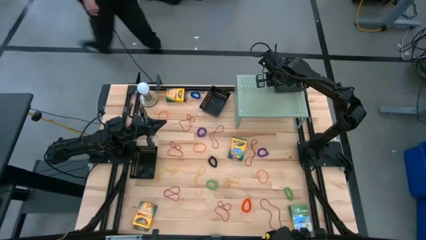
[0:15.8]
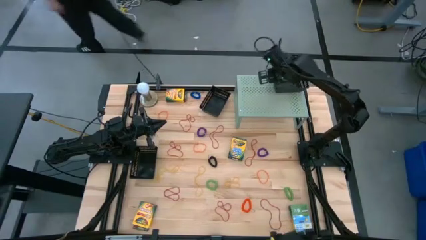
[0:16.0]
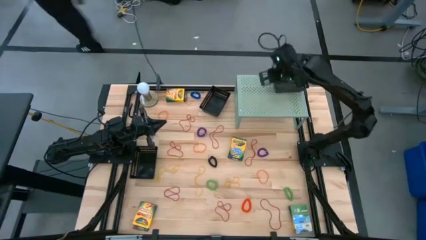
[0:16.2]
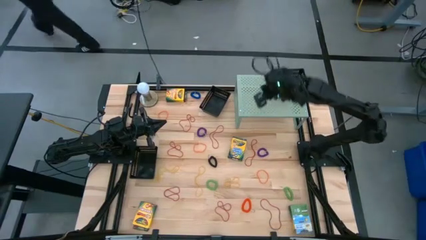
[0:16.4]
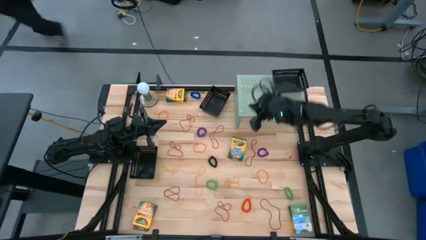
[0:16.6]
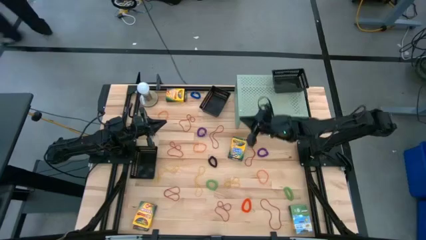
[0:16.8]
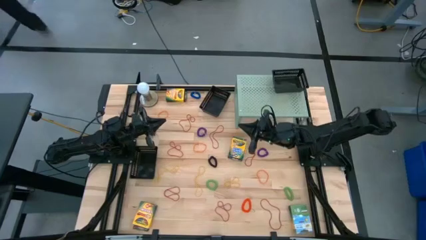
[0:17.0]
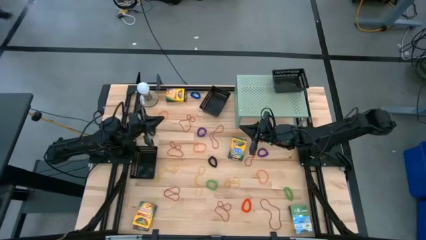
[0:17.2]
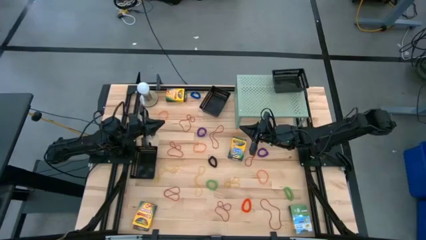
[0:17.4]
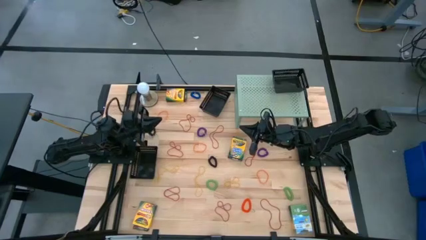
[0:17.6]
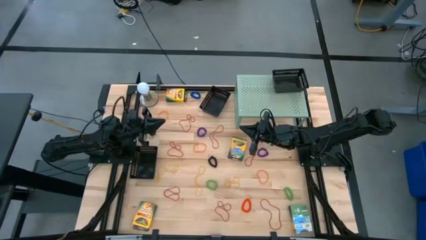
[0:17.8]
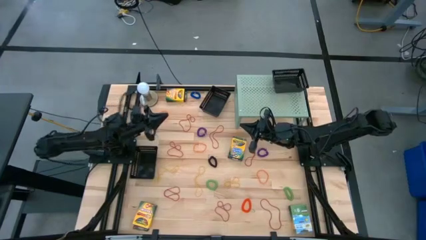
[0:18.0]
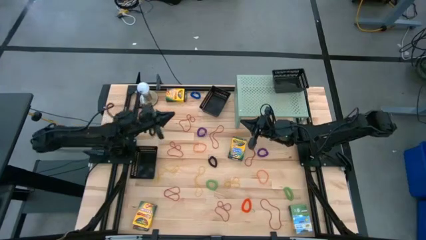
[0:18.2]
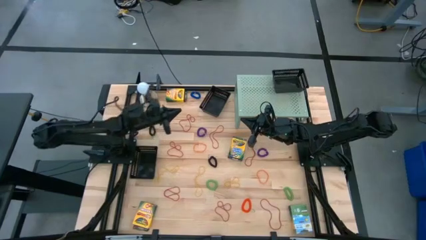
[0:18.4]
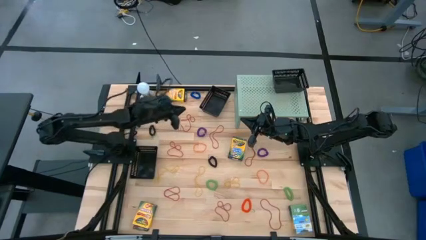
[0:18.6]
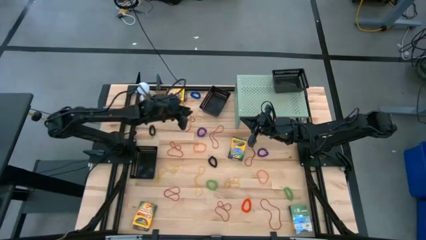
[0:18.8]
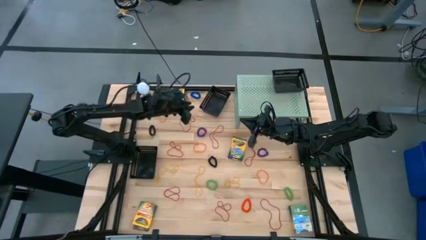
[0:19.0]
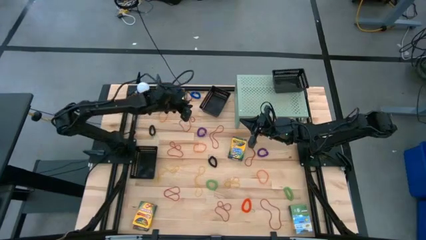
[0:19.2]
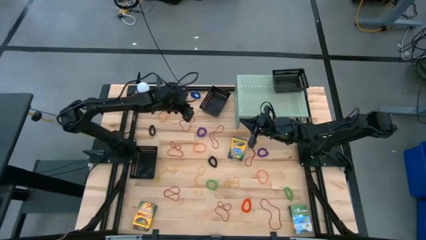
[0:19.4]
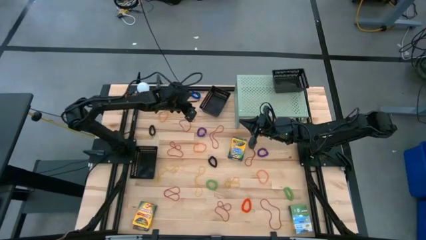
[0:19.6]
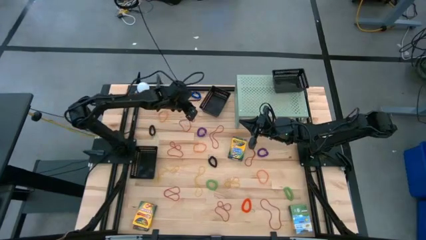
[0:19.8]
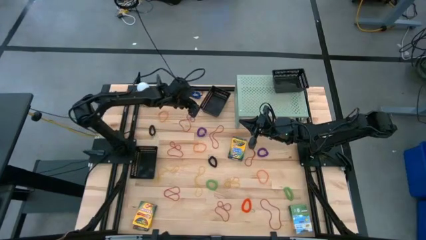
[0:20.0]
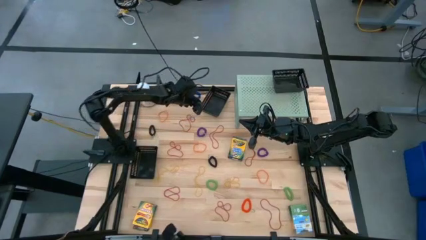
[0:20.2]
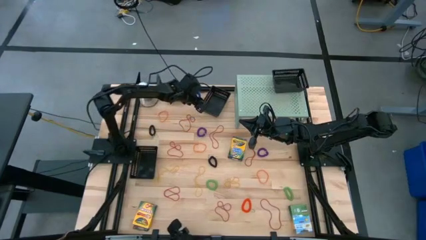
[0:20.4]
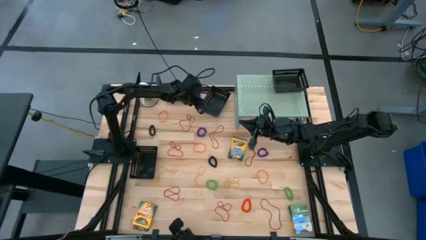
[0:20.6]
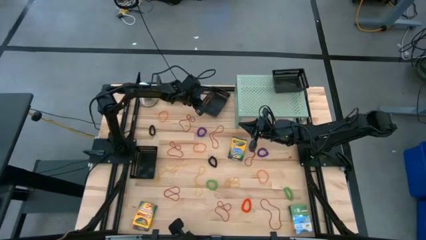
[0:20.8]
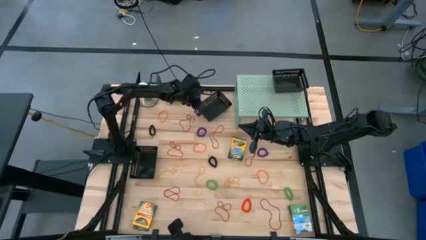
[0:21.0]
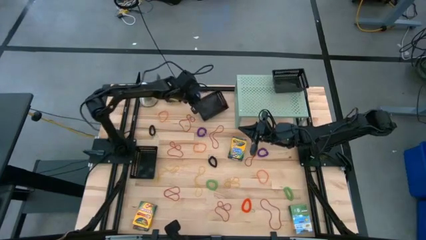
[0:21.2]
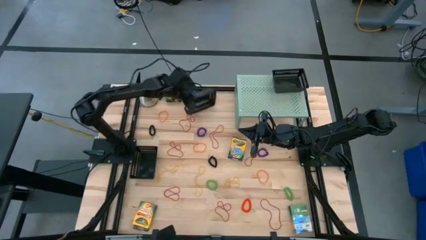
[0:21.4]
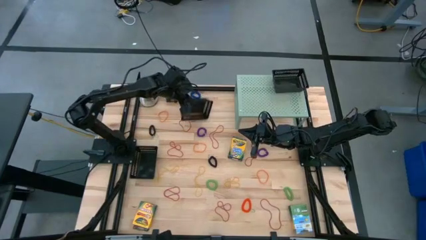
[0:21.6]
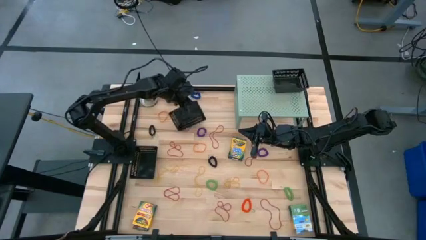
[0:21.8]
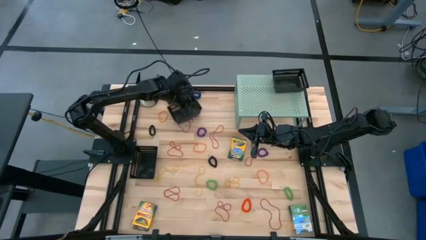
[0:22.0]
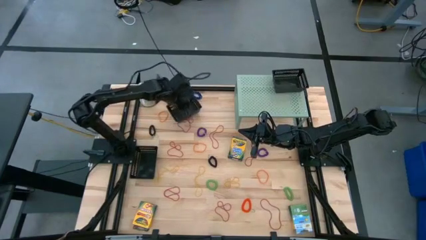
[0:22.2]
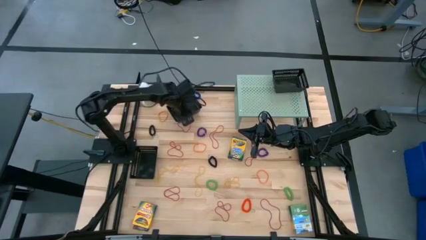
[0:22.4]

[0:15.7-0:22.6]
Task: Pick & Place Office Desk Supplies
Put the top black bin on the shelf

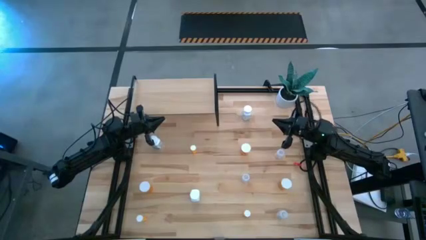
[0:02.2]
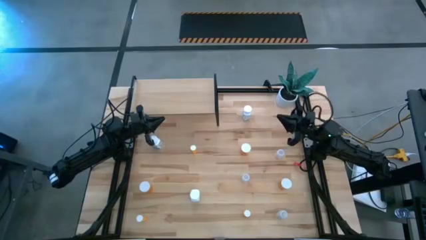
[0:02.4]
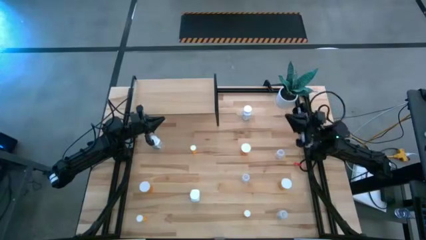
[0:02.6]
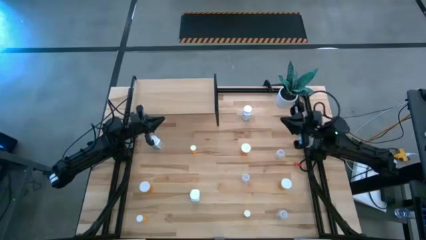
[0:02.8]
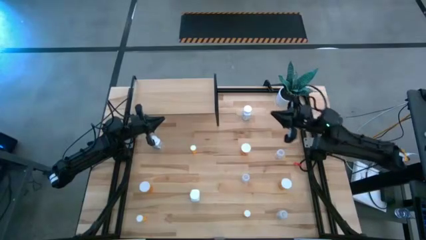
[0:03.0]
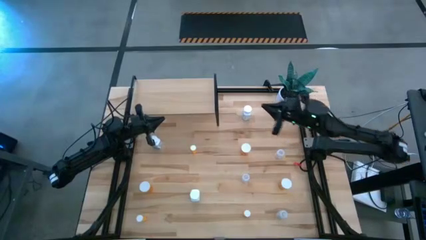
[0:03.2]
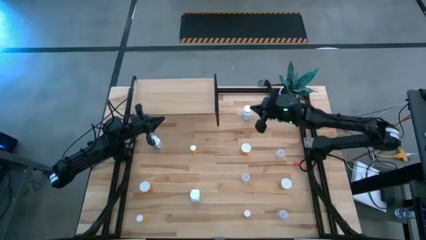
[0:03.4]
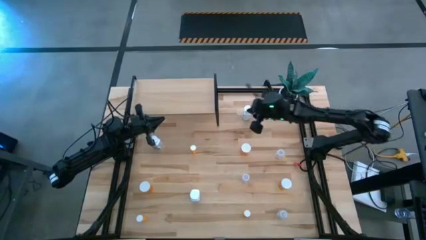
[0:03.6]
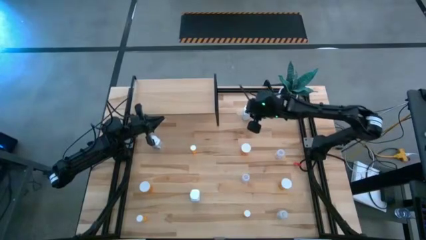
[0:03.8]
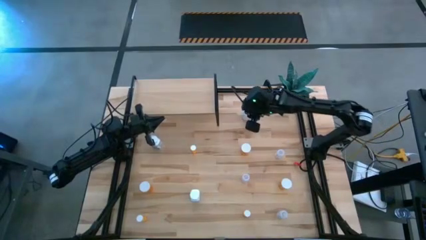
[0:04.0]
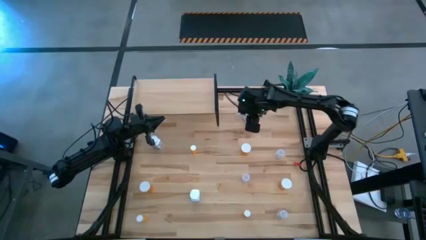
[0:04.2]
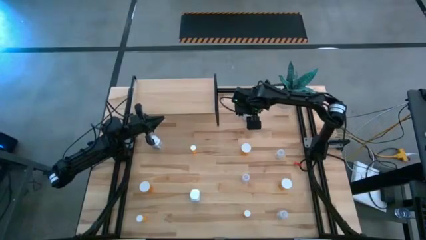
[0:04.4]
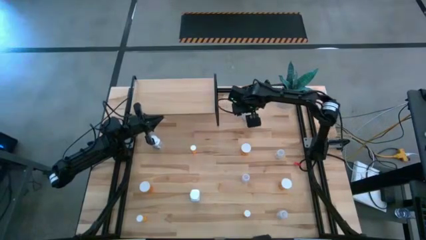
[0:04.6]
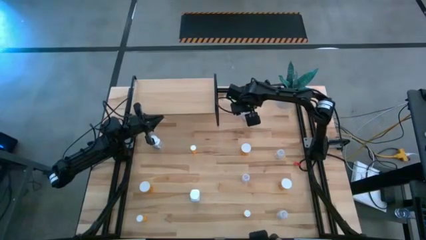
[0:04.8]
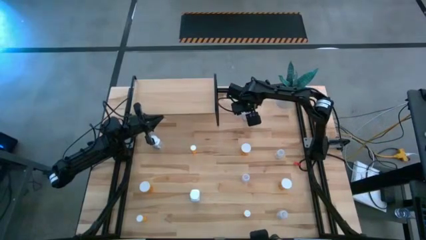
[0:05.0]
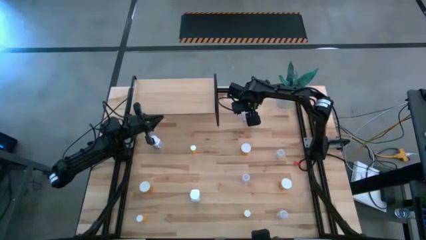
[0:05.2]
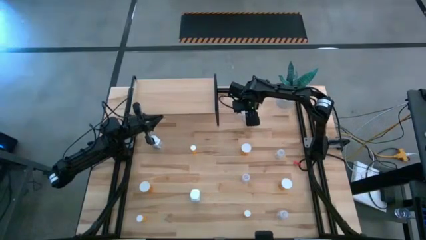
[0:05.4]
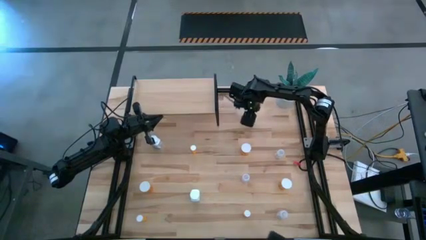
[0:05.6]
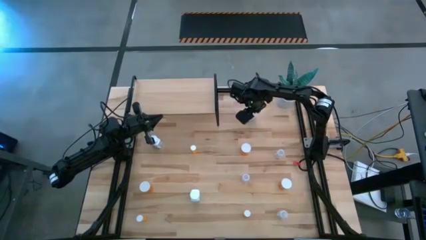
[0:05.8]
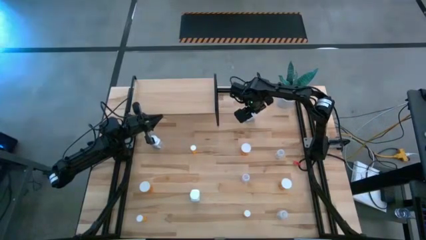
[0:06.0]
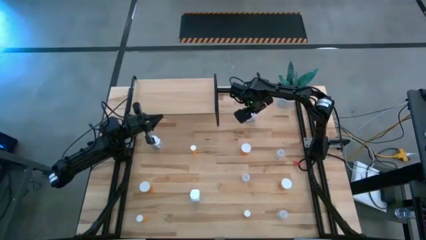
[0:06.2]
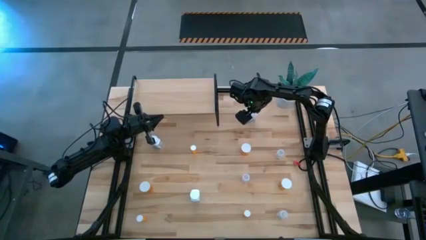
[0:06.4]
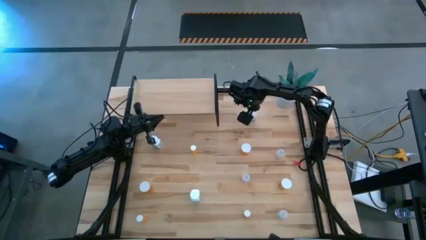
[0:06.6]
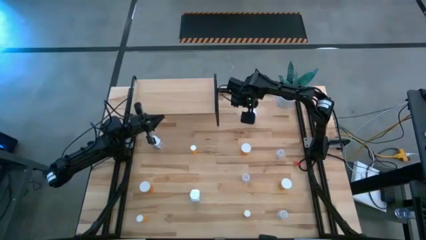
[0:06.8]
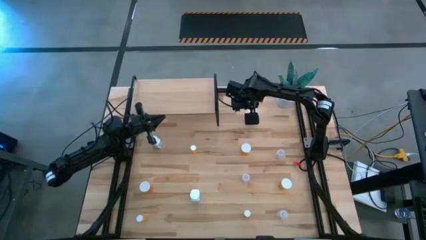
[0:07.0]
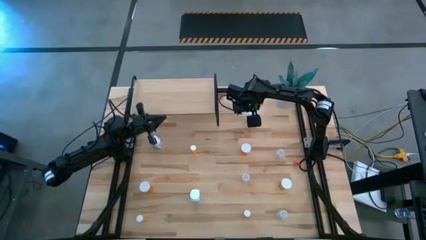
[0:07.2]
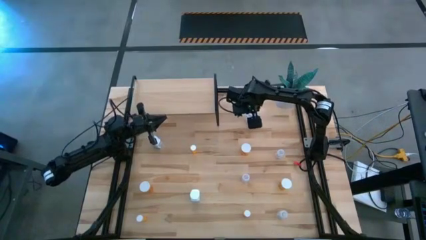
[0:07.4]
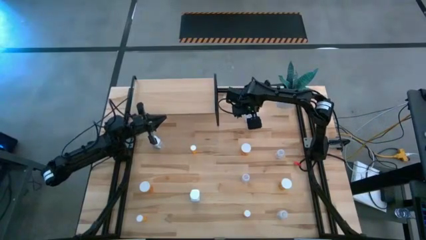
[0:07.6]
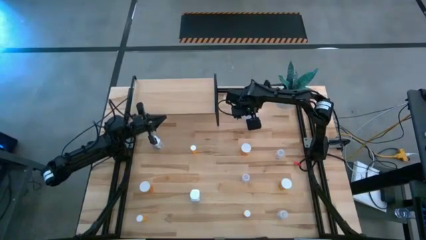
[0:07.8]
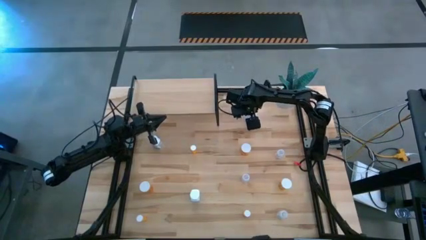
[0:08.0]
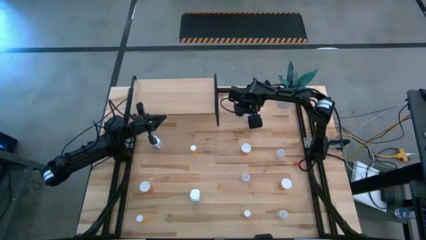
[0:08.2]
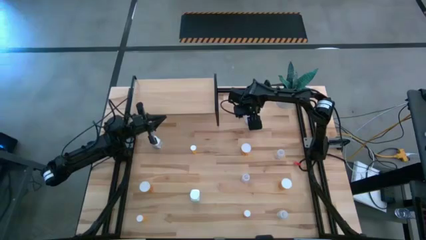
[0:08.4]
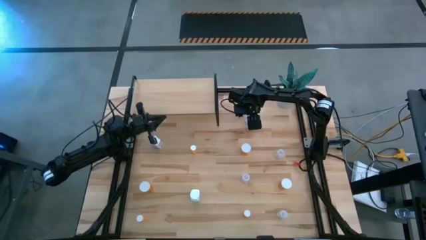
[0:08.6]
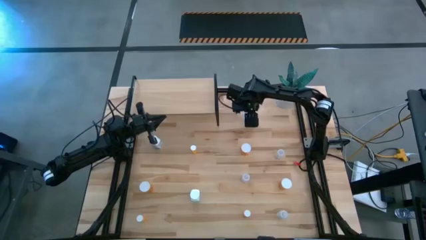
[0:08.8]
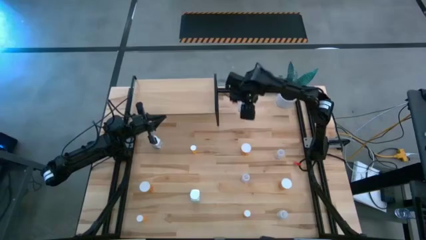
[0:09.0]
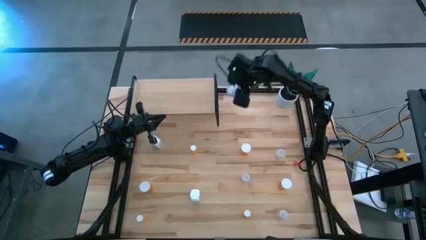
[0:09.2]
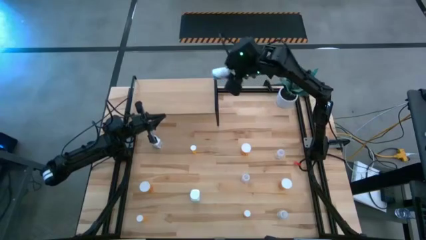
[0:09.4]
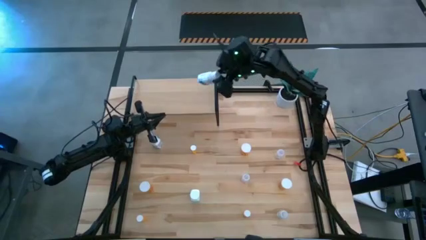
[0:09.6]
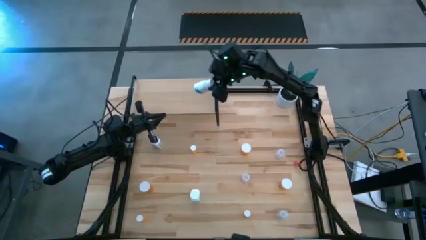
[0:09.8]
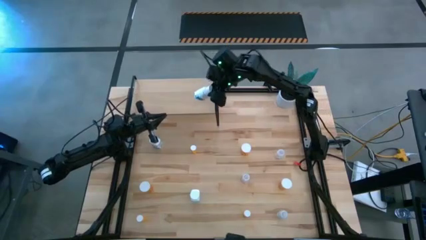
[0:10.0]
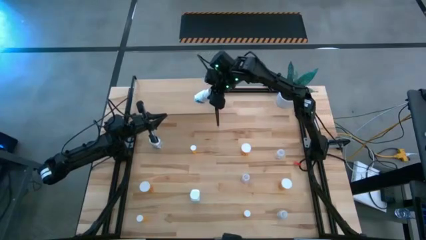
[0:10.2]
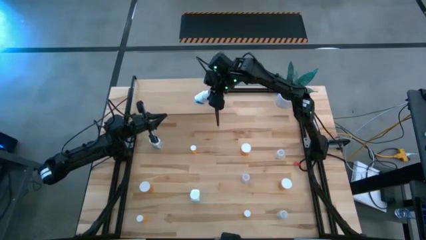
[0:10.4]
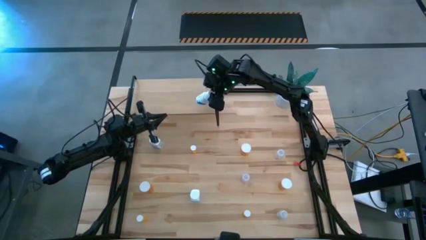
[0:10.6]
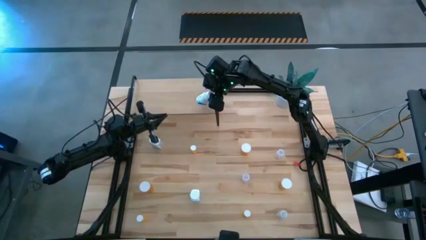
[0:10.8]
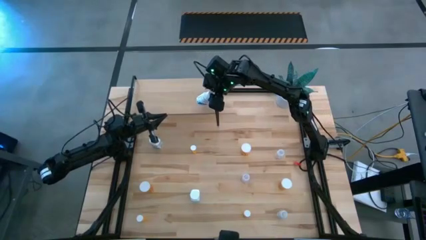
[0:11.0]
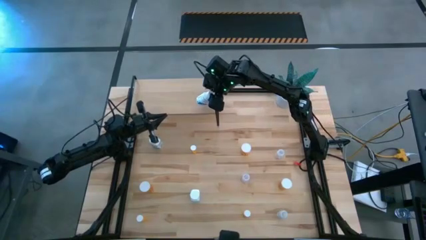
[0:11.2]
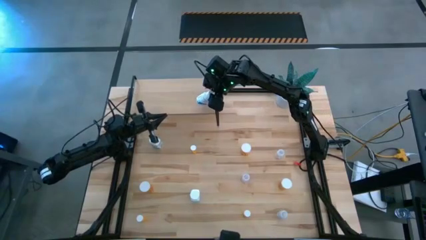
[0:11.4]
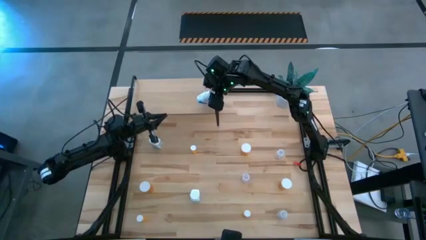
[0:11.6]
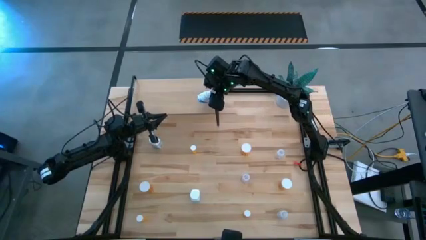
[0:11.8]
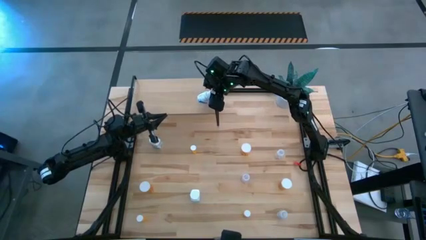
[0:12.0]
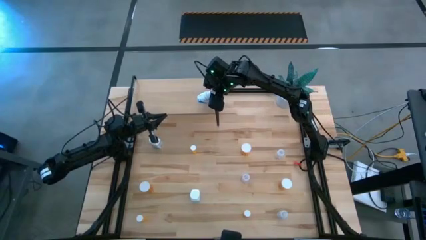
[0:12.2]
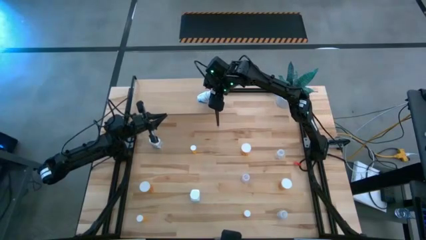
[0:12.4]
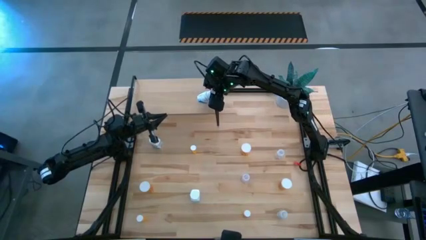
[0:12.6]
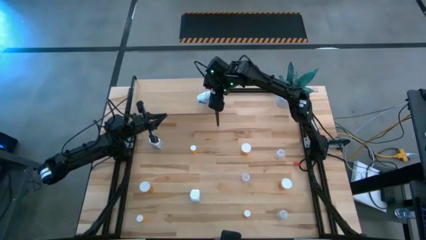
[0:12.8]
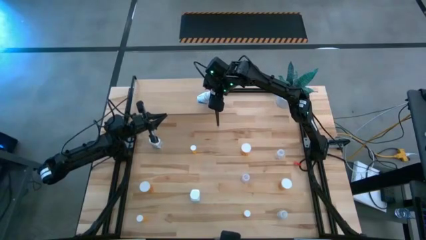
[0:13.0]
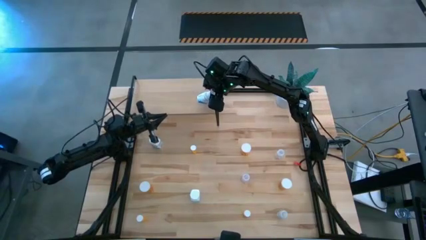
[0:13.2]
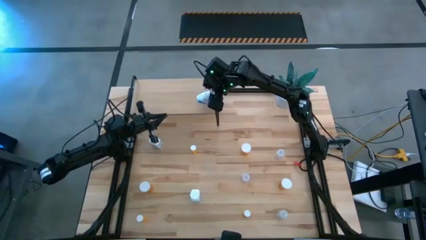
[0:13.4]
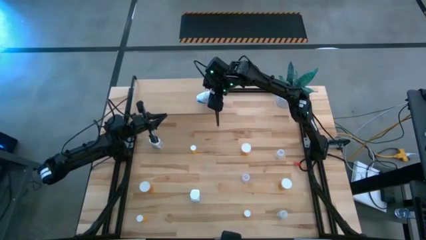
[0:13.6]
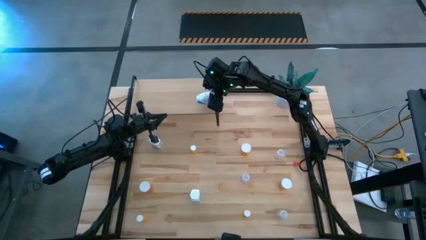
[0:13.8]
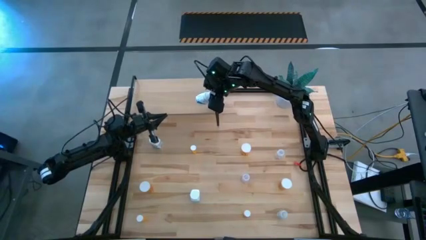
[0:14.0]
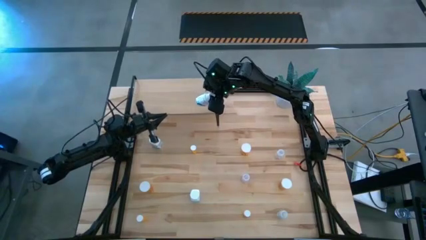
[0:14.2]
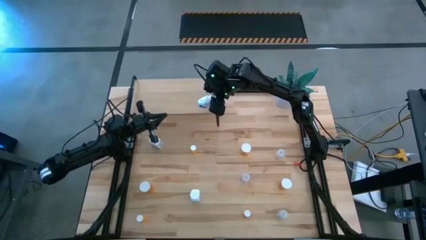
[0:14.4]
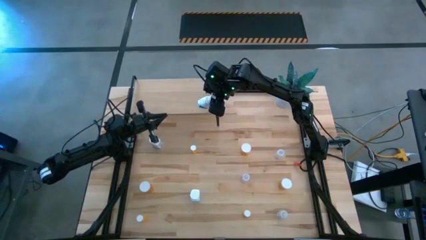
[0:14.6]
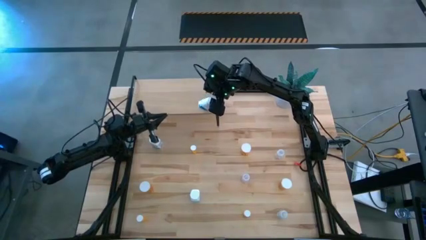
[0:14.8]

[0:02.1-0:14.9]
Task: Pick and place medicine bottles onto shelf by color
Put the top white pill bottle on the shelf
